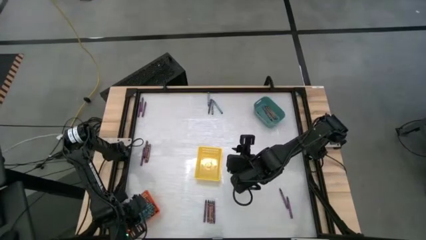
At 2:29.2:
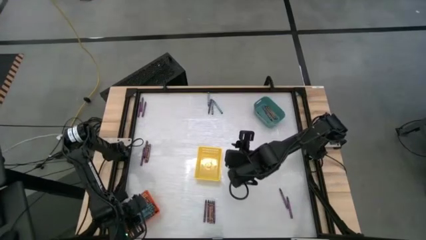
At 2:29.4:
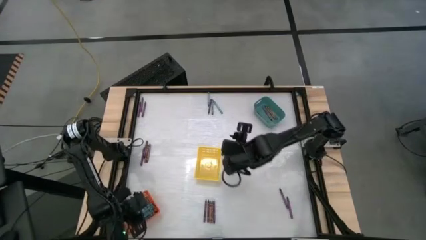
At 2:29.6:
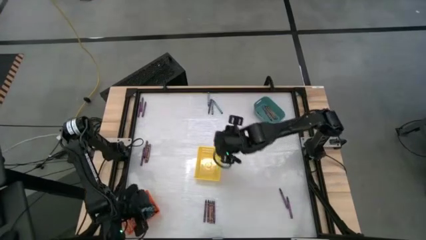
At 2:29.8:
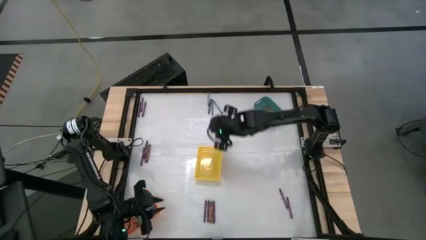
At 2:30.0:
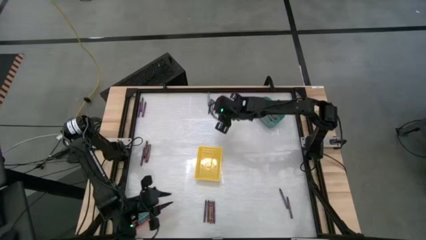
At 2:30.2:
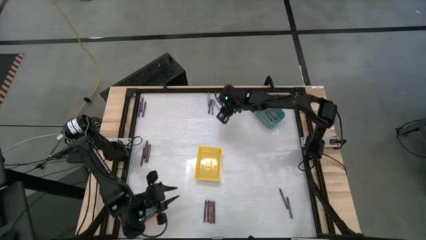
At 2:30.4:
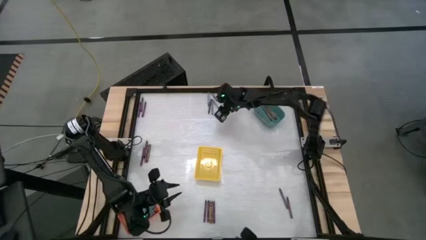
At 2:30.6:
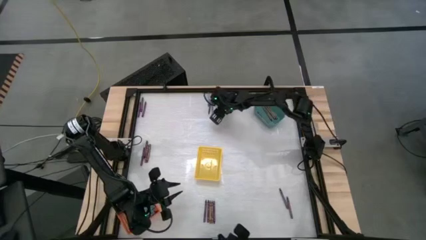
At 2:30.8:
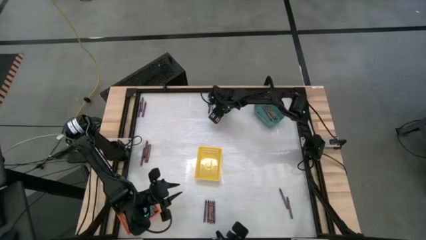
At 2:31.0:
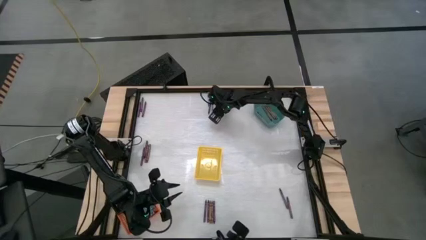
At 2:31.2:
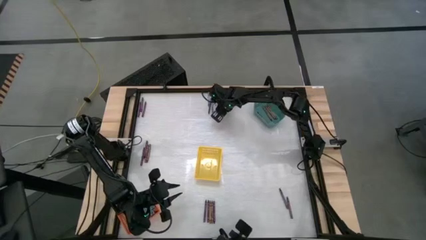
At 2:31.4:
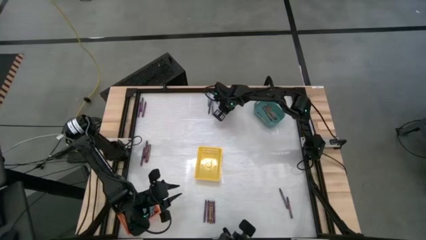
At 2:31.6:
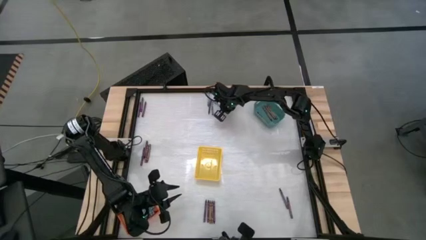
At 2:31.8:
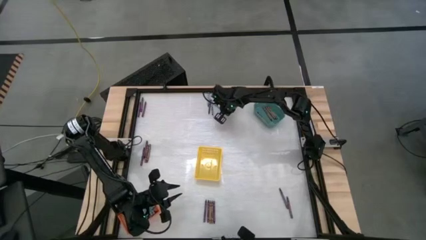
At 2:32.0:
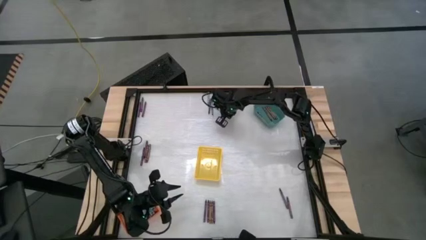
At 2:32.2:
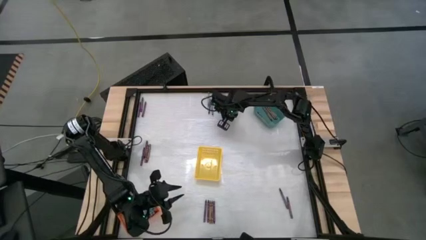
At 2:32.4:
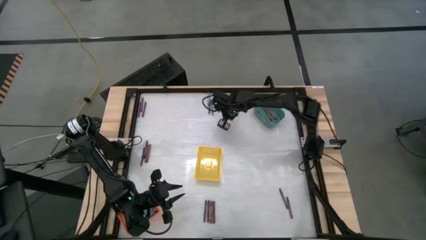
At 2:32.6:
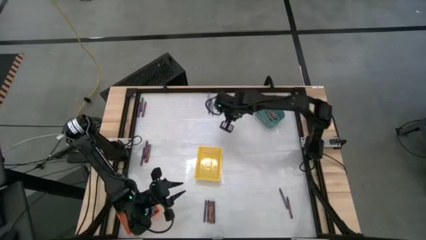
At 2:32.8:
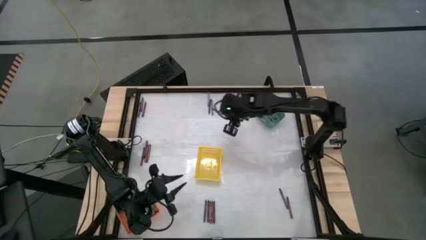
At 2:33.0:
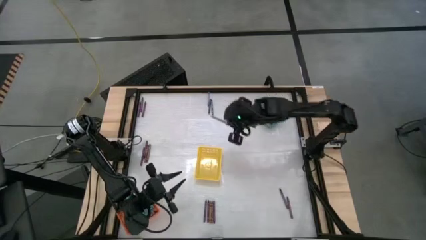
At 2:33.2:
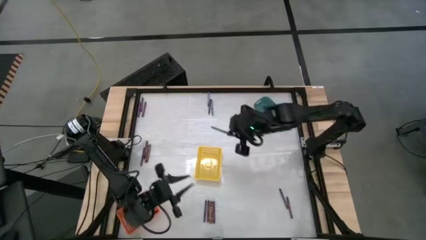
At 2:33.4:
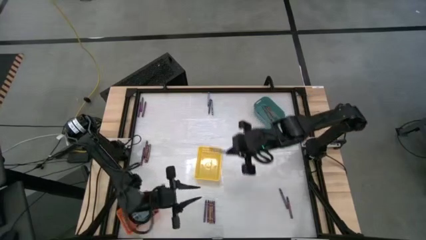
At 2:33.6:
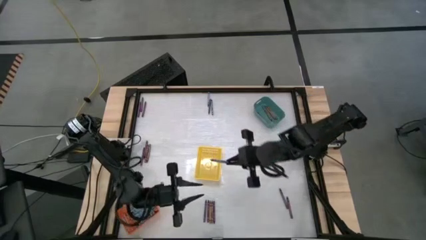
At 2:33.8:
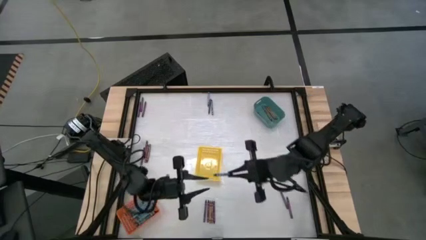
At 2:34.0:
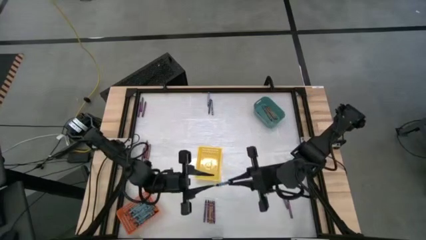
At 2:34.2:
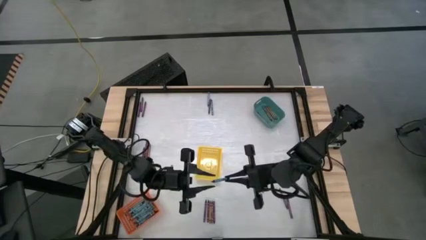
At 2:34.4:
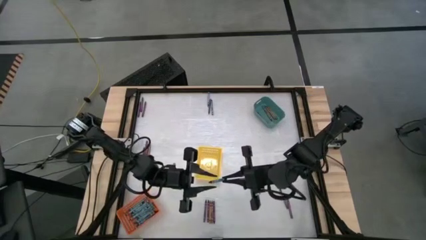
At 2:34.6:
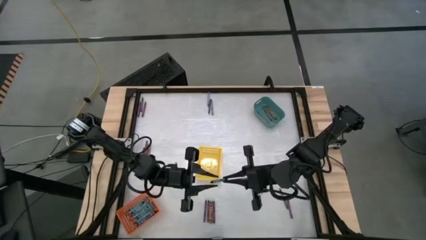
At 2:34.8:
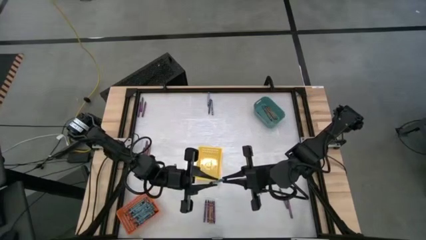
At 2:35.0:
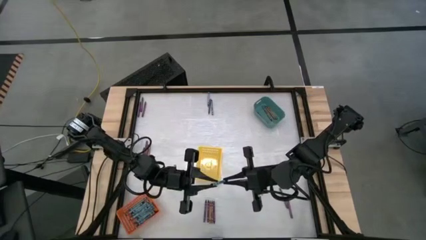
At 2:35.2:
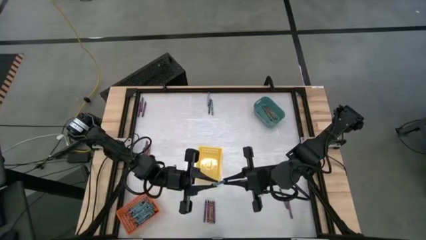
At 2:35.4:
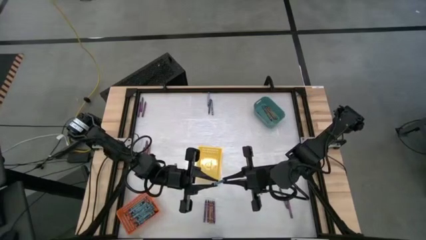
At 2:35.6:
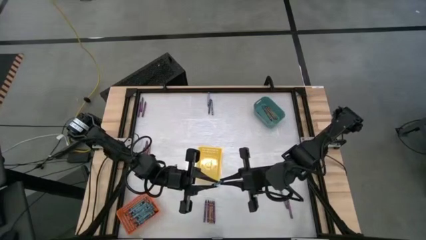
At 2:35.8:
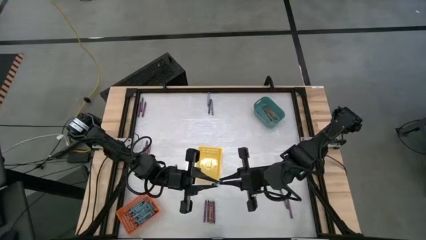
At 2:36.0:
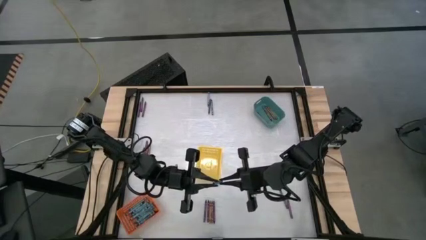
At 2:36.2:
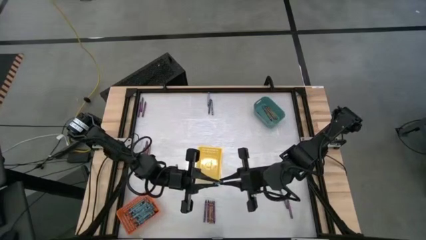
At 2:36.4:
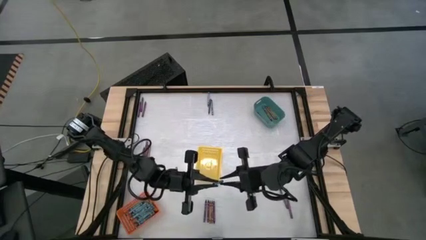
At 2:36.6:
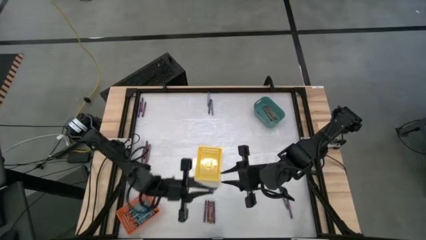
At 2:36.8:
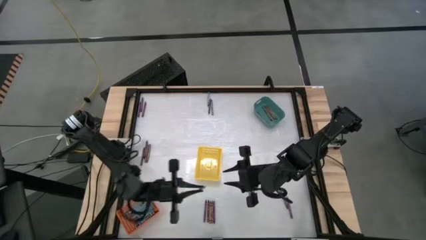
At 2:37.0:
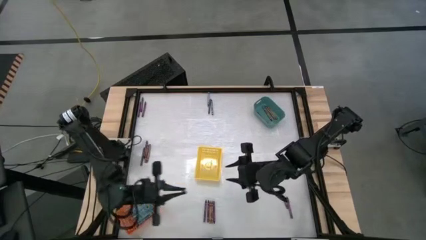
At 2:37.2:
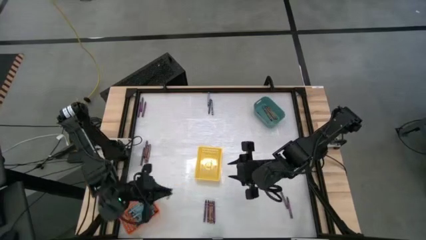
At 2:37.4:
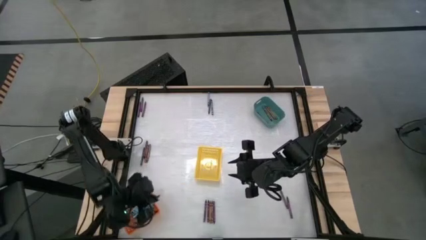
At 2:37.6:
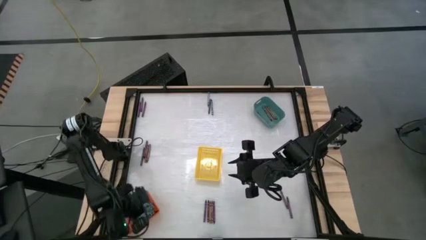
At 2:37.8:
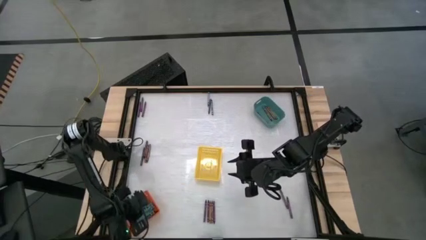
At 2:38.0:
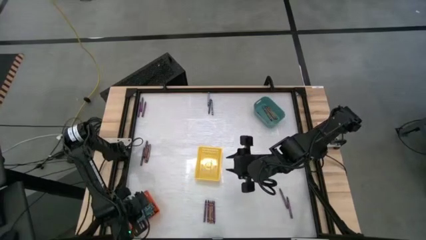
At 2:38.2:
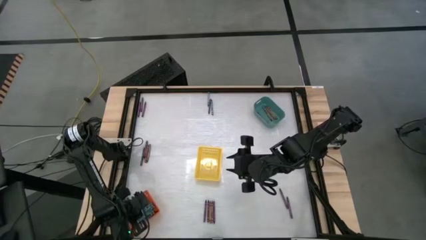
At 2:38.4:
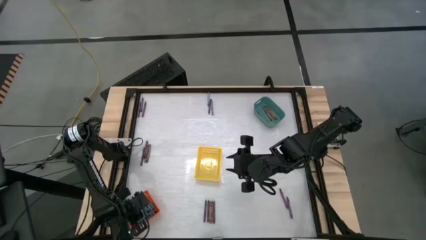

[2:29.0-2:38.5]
Task: Sort crayons
Put the dark blue crayon into the orange basket

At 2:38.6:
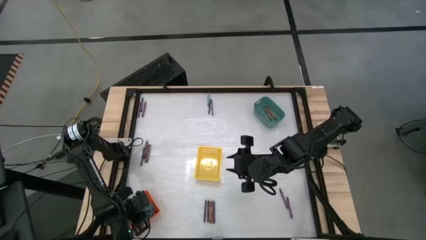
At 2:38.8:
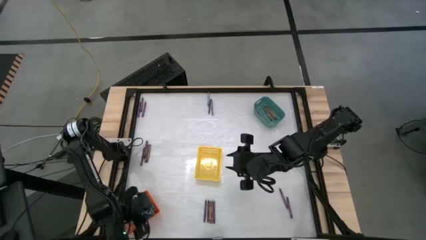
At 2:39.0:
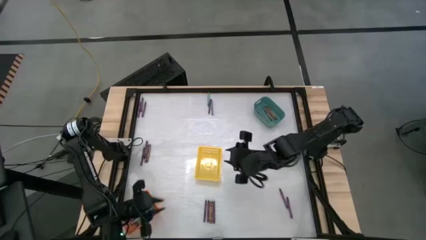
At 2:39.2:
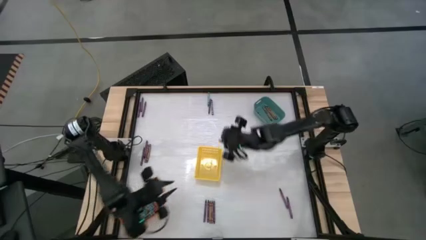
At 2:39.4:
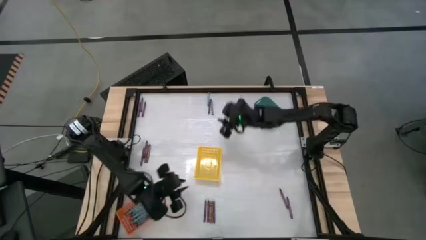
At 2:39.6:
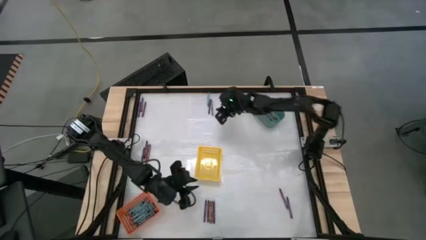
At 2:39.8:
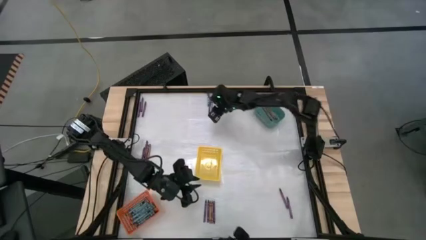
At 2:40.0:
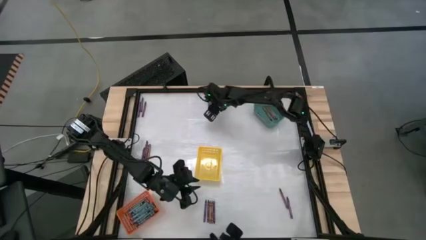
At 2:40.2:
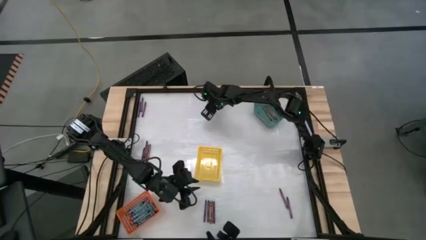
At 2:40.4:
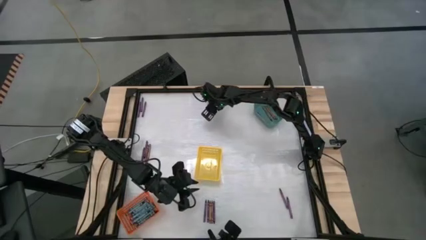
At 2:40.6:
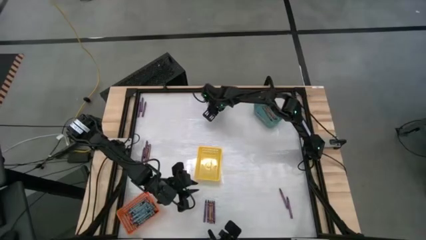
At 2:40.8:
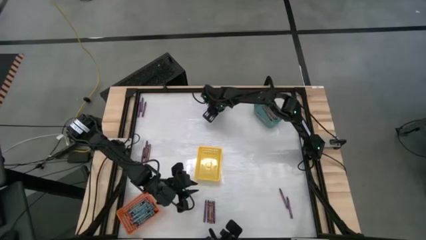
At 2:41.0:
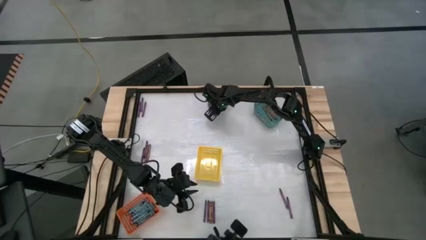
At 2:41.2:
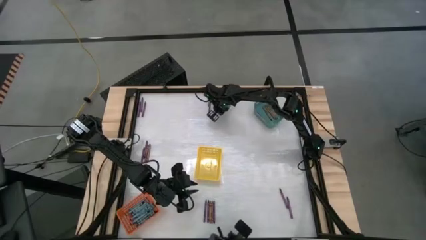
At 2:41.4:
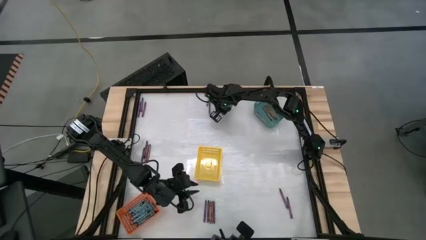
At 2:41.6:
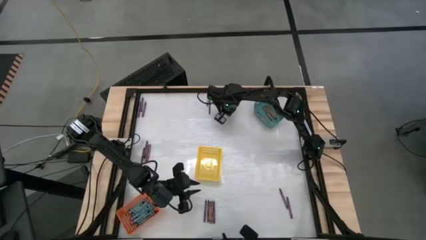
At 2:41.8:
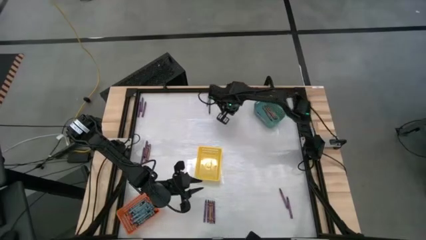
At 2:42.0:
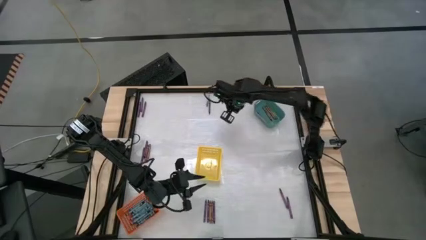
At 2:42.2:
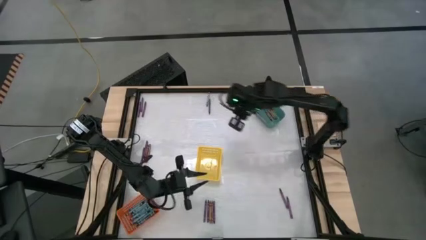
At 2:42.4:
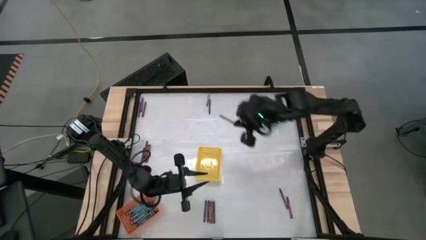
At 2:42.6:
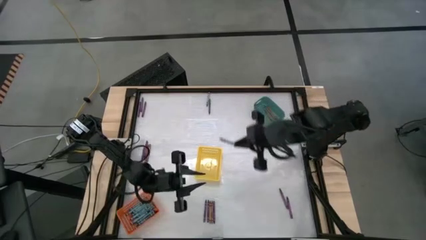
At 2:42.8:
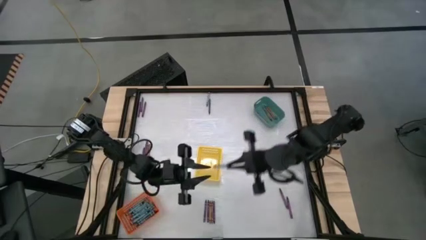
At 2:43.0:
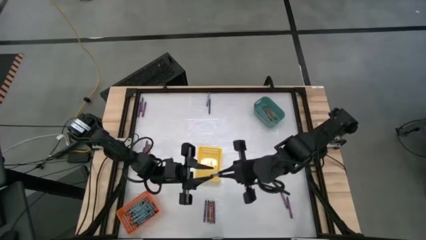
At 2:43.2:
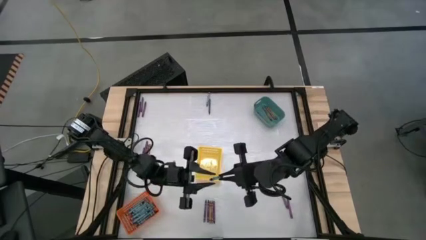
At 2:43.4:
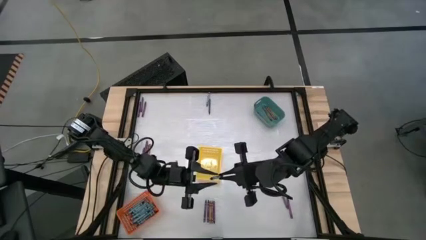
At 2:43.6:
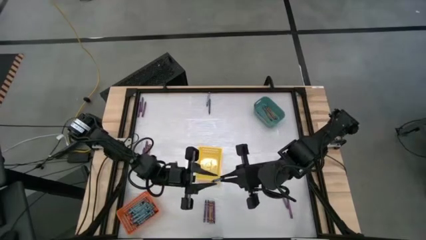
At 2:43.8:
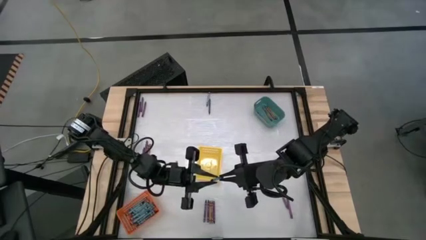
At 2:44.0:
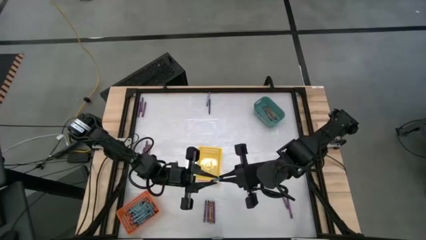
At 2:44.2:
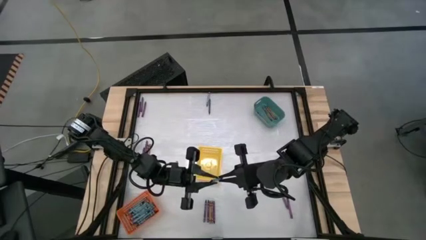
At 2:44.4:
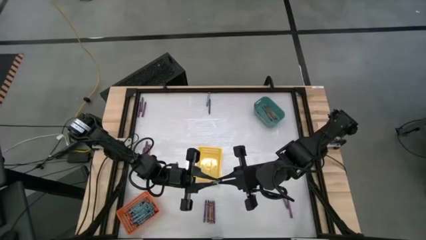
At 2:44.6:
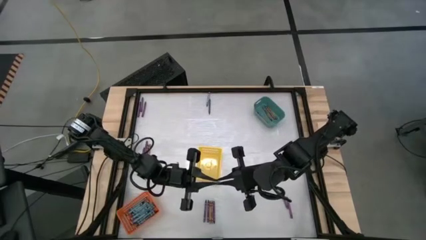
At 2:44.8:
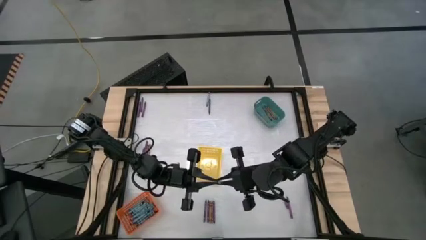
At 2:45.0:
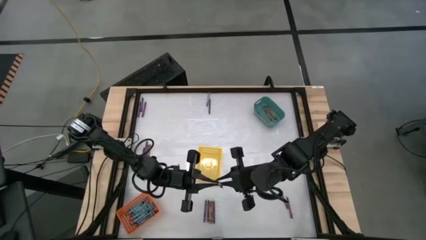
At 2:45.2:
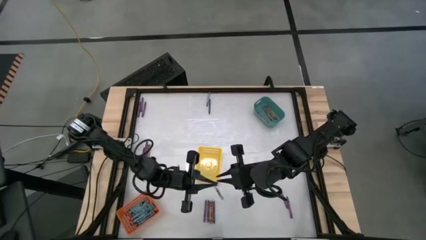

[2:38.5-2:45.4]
Put the blue crayon into the orange basket
